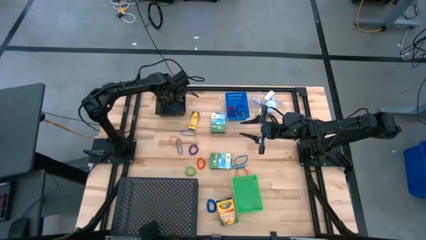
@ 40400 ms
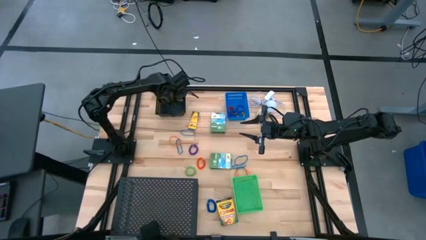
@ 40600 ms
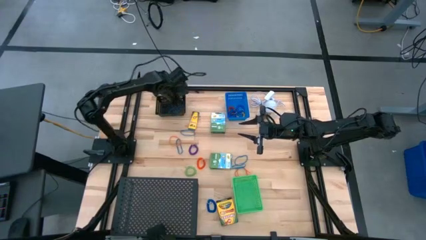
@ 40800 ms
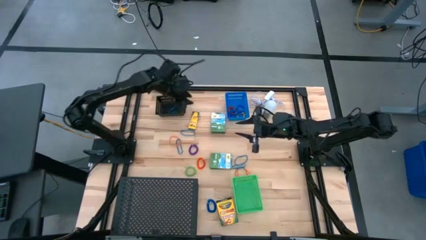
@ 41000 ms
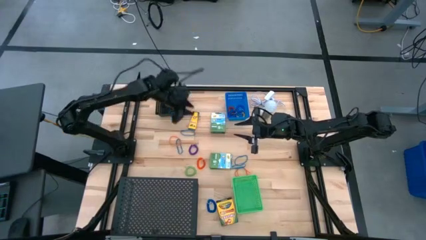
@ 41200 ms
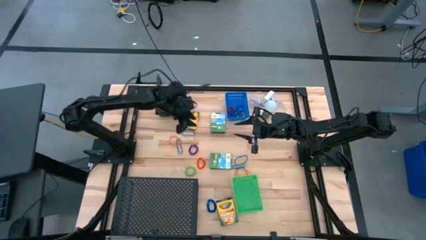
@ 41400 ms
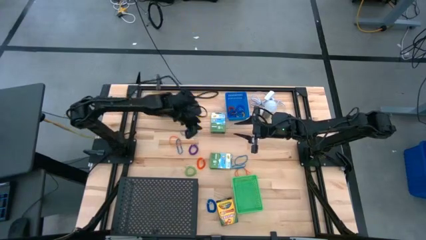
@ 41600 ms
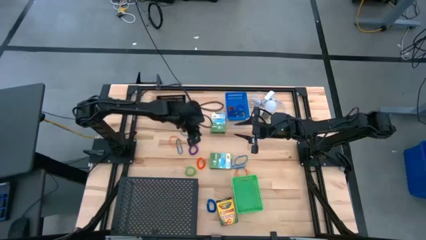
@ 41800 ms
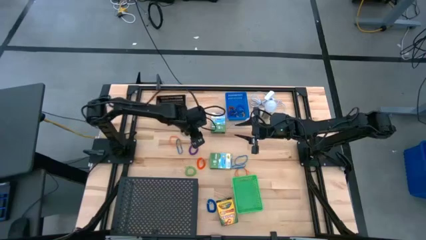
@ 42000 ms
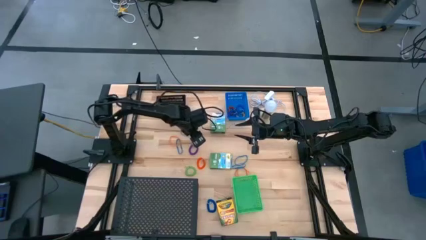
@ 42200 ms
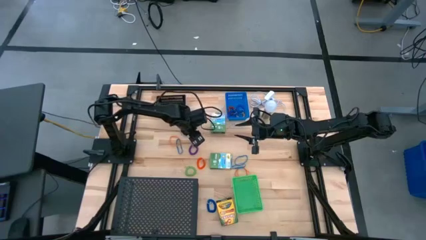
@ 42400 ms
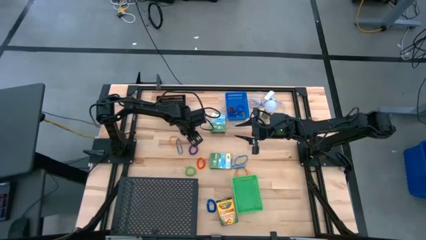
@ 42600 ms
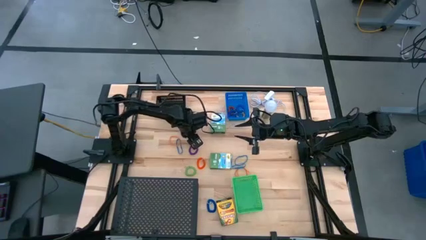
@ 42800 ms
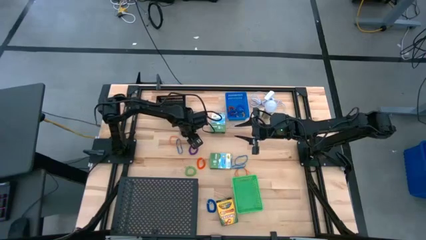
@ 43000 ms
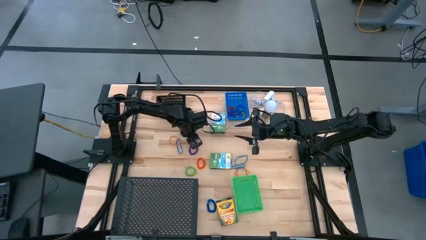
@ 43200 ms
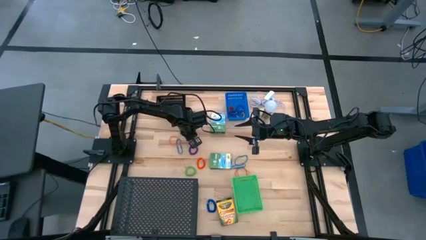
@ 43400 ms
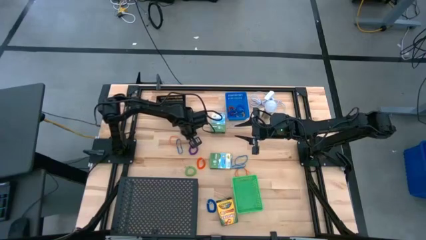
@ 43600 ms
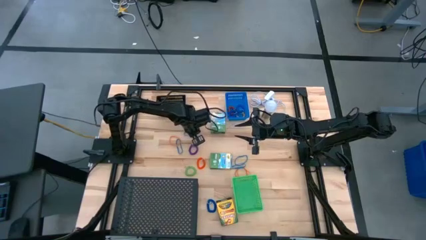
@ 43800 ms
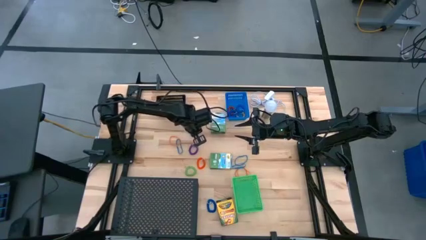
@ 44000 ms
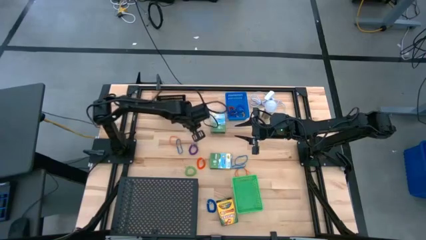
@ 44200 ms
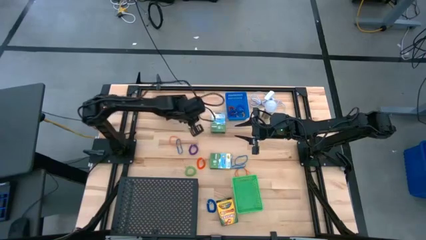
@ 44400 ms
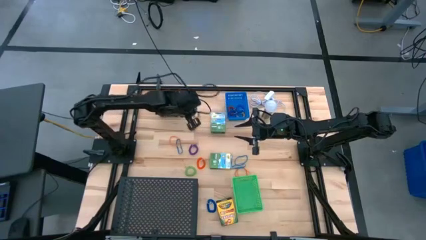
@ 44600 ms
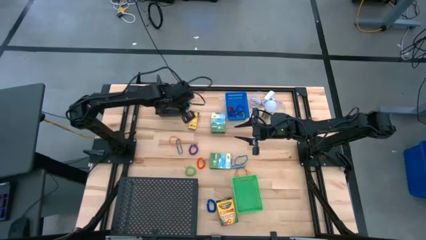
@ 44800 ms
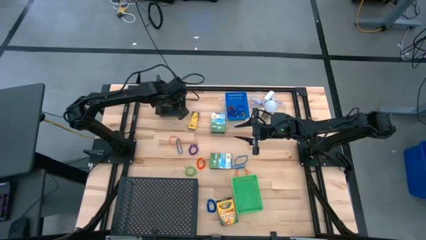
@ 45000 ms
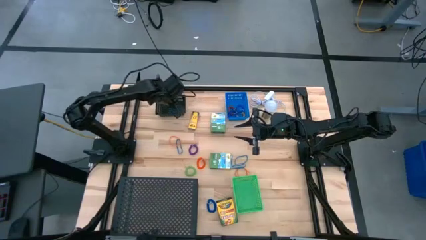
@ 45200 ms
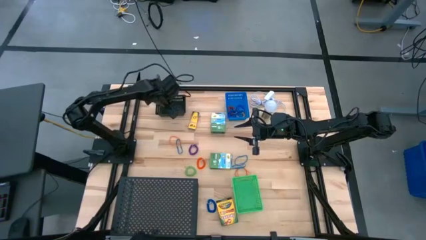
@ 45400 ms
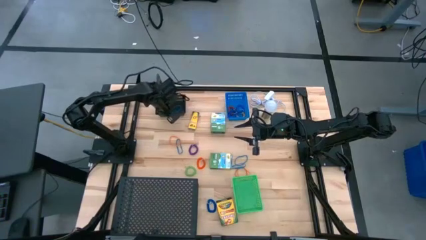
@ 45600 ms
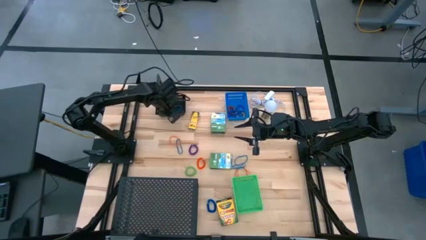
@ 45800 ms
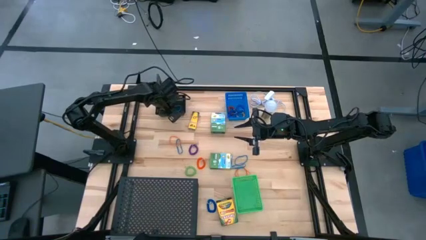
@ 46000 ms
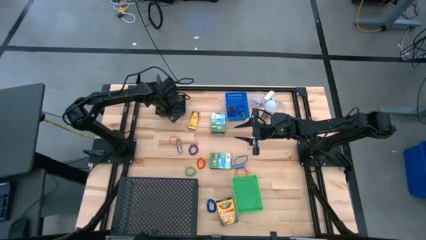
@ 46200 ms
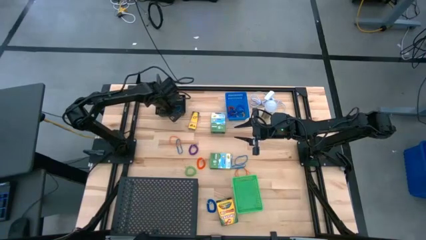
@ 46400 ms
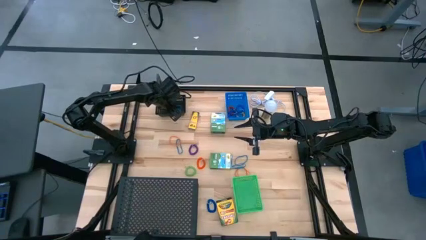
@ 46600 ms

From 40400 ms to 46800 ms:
Task: Pick & Place Office Desk Supplies
Put the blue rubber band into the black bin

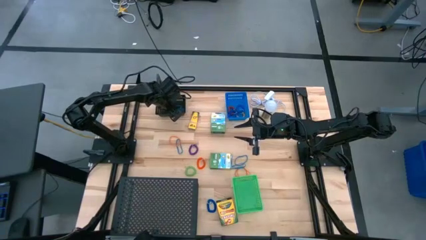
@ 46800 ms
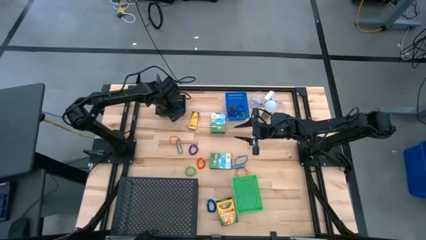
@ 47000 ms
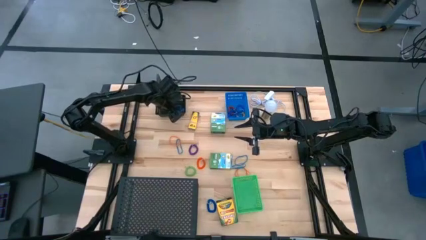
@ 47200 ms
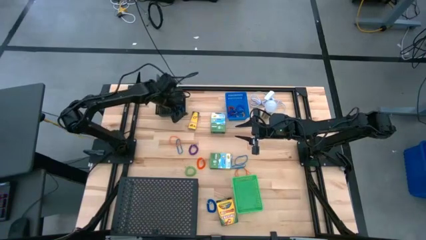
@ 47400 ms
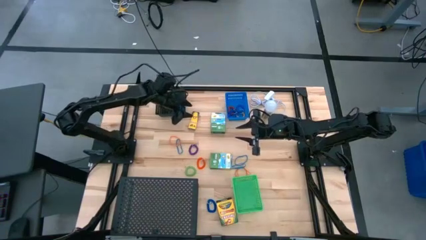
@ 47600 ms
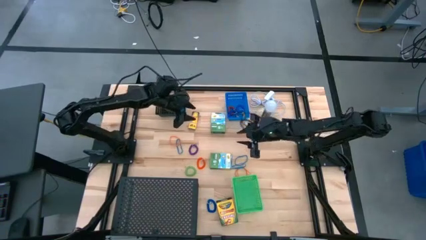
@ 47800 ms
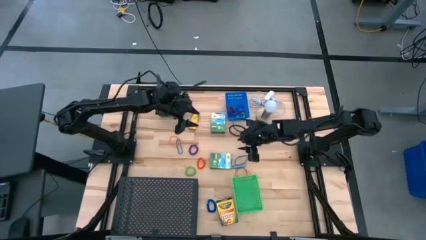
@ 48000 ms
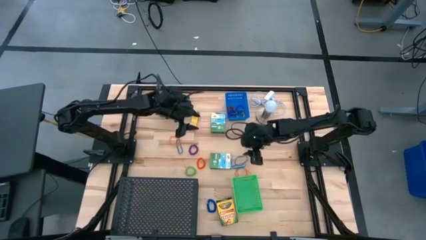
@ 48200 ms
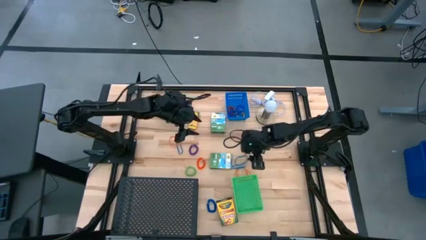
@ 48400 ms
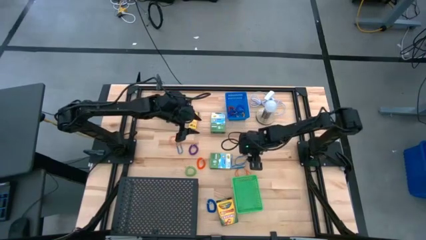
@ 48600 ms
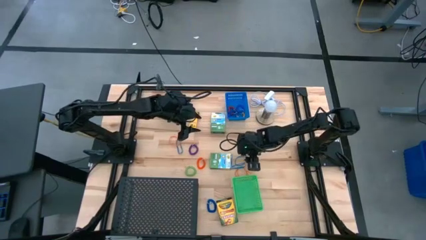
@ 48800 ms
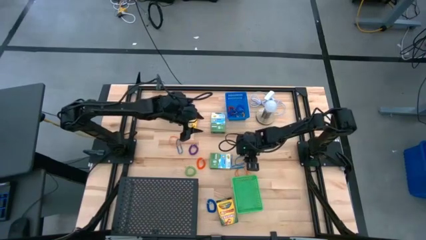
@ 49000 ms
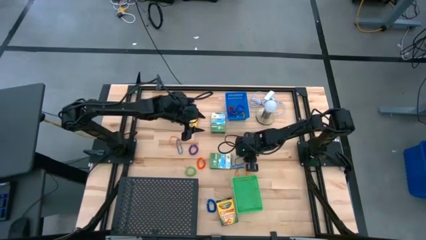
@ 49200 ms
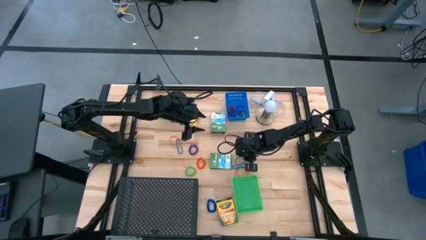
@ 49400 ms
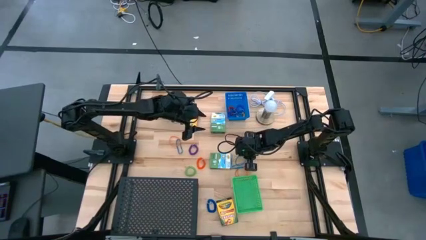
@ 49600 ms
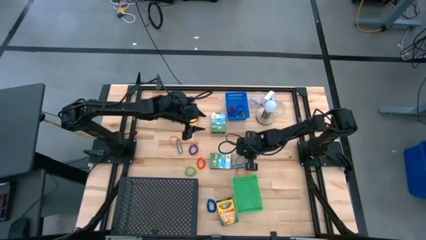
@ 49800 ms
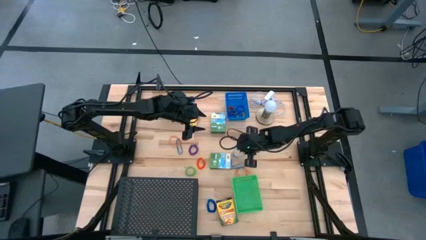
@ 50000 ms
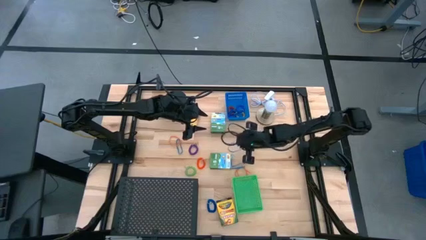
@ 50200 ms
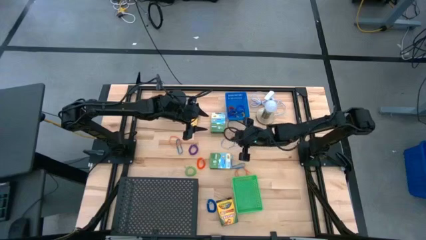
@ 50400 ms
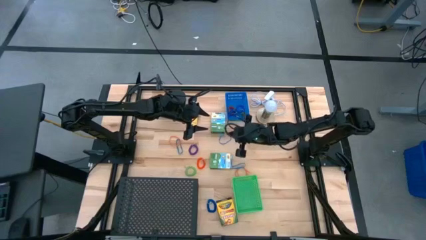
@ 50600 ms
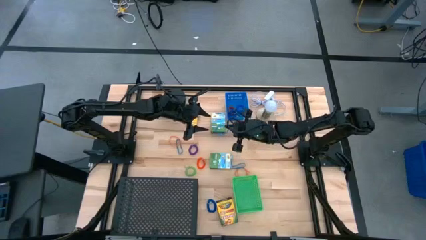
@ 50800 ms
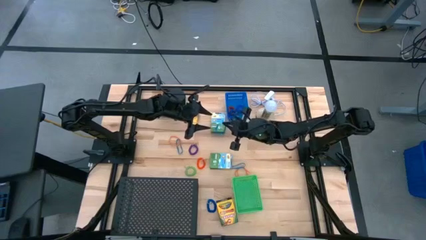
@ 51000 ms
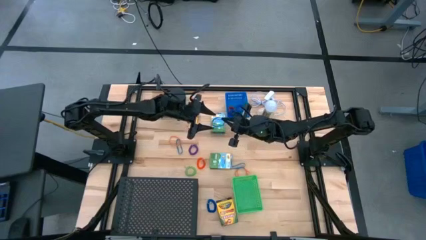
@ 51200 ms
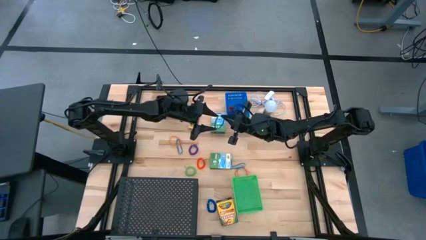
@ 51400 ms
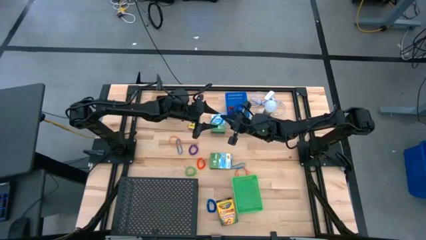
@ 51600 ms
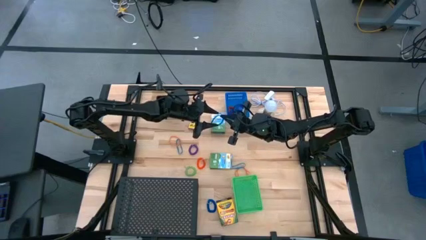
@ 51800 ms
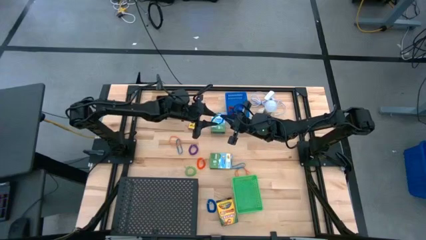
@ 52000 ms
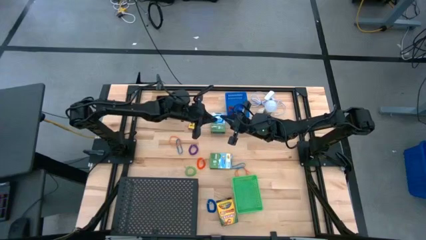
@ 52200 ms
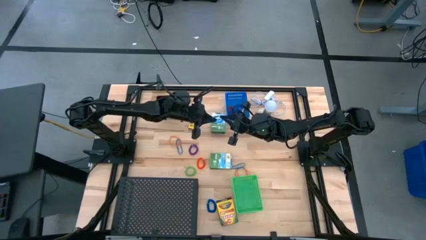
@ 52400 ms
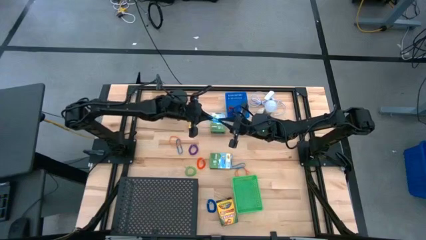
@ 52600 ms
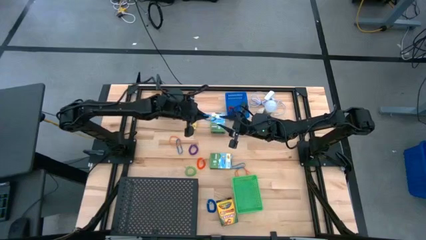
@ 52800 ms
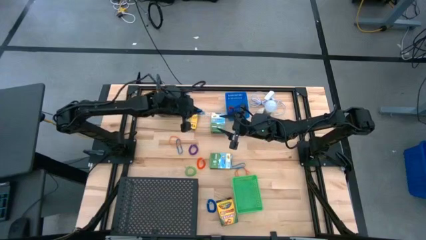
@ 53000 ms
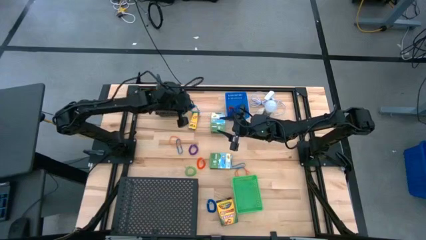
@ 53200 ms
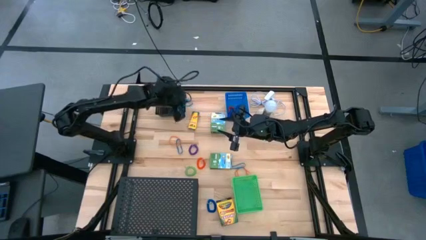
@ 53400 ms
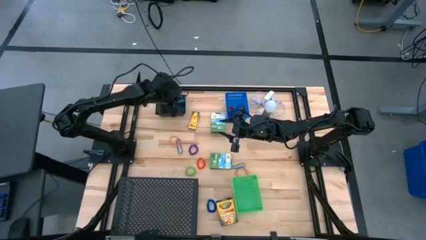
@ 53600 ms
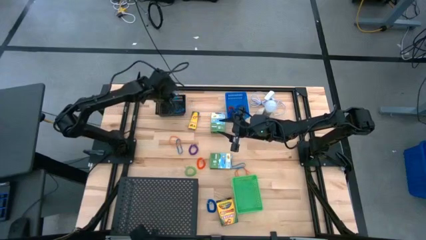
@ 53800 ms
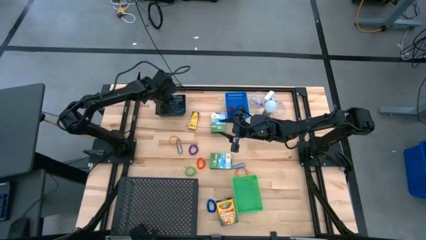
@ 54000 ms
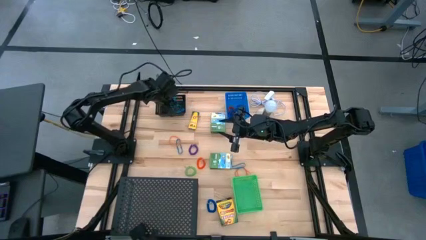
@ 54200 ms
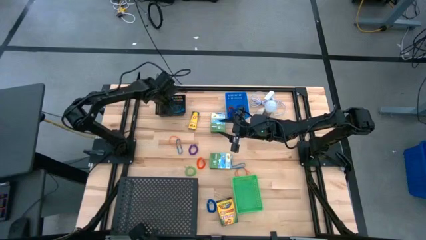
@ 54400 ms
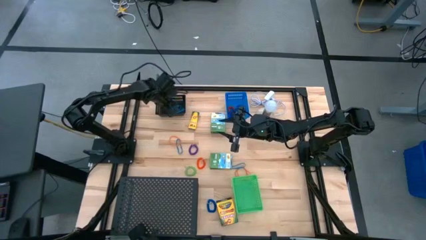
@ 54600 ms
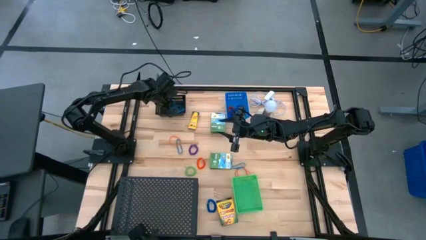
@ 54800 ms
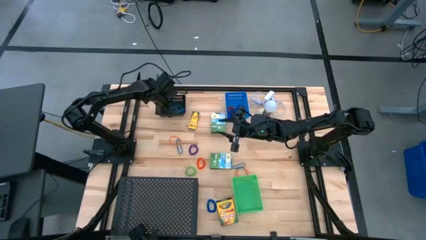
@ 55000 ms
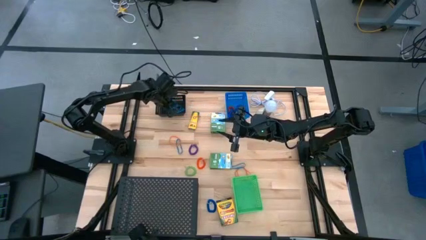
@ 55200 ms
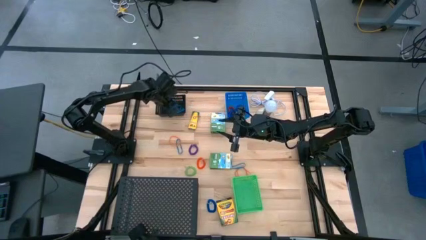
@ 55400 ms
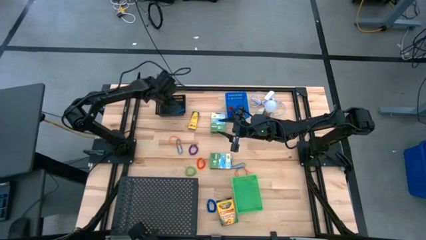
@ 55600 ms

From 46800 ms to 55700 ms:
Put the top right blue rubber band into the black bin
